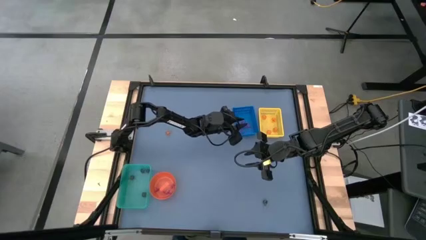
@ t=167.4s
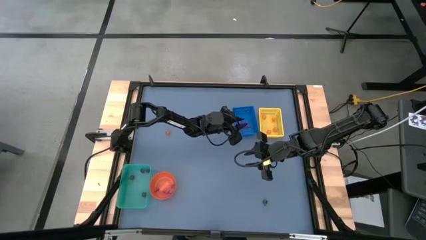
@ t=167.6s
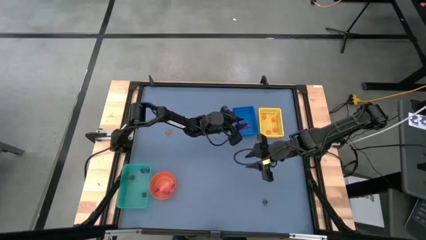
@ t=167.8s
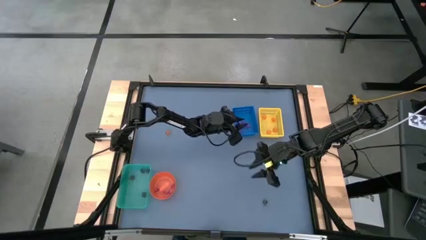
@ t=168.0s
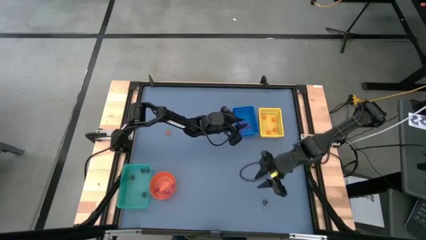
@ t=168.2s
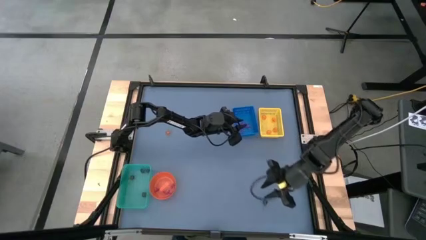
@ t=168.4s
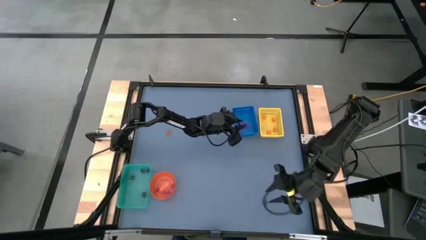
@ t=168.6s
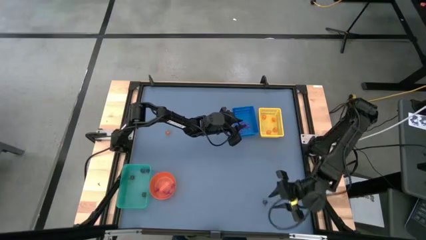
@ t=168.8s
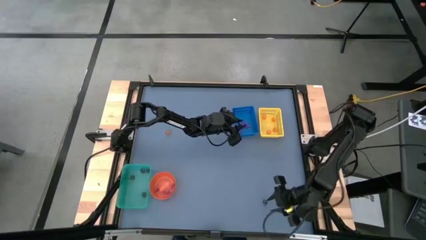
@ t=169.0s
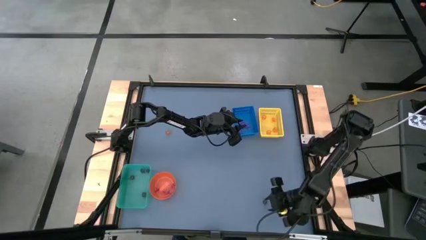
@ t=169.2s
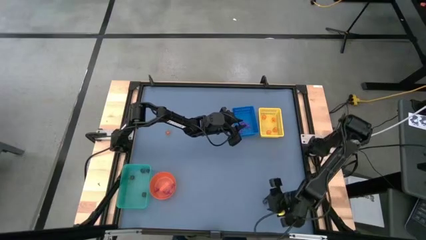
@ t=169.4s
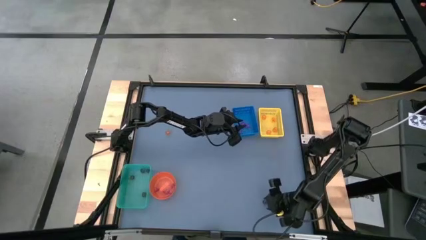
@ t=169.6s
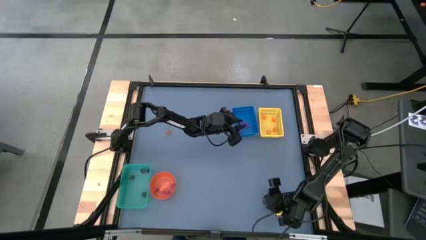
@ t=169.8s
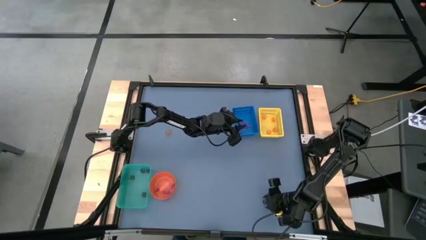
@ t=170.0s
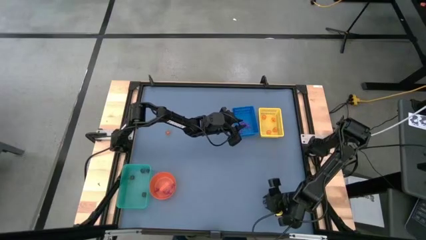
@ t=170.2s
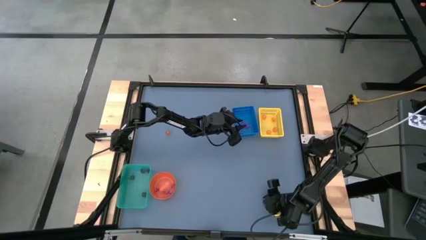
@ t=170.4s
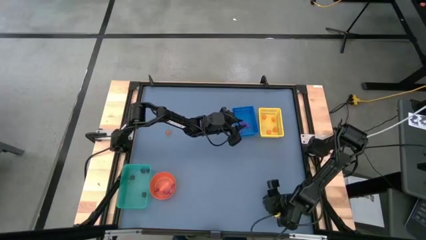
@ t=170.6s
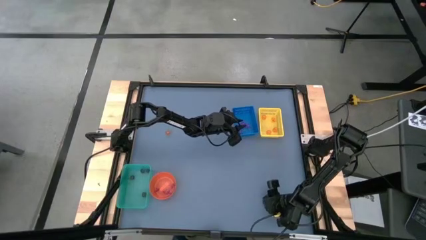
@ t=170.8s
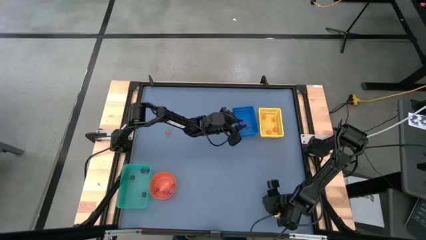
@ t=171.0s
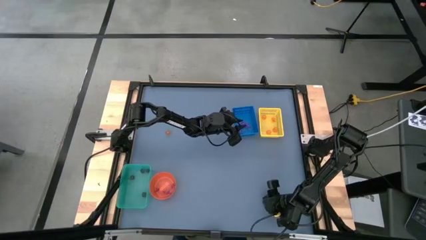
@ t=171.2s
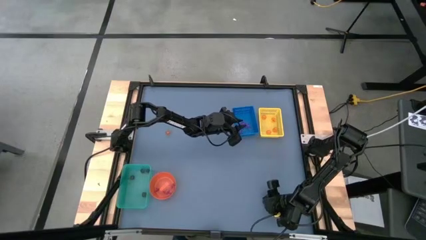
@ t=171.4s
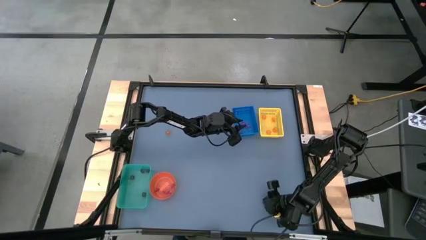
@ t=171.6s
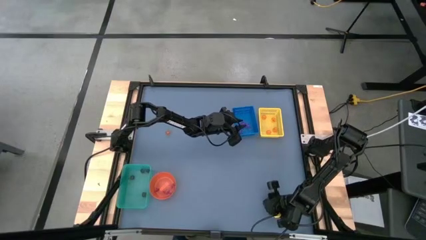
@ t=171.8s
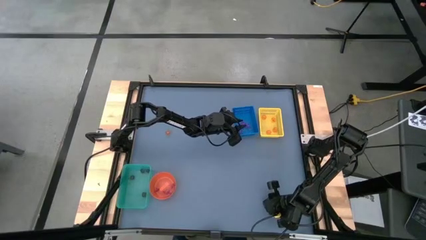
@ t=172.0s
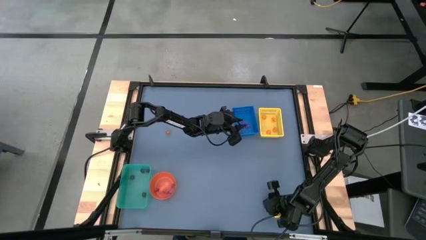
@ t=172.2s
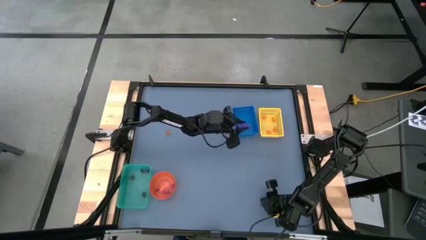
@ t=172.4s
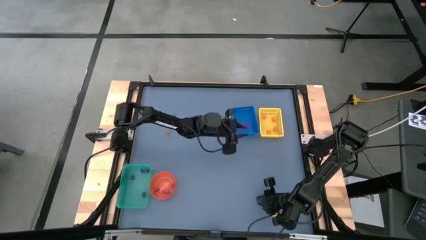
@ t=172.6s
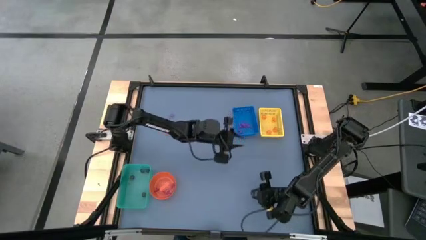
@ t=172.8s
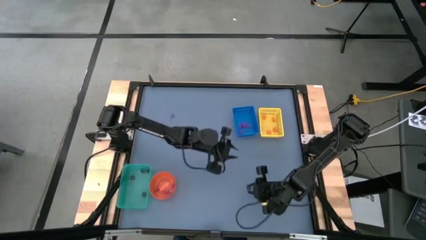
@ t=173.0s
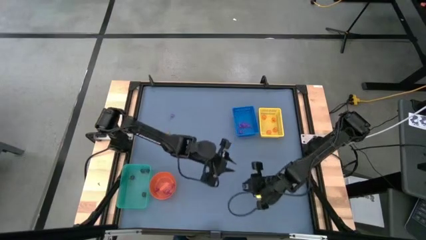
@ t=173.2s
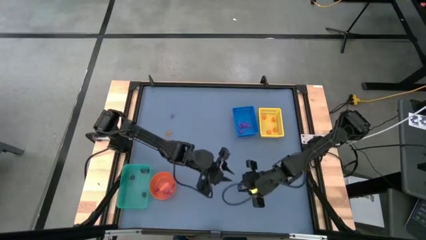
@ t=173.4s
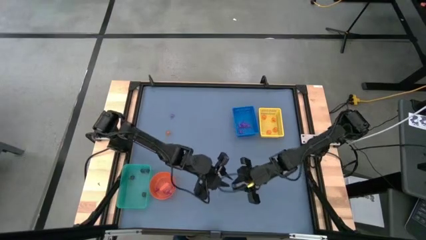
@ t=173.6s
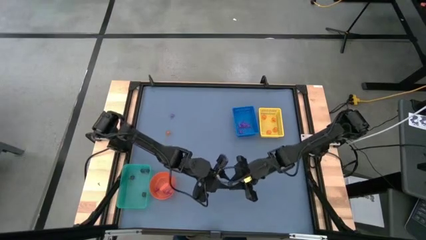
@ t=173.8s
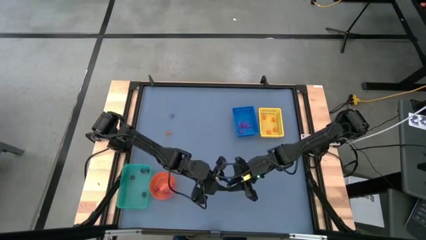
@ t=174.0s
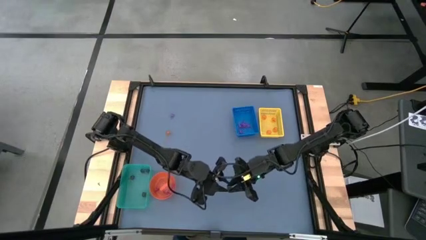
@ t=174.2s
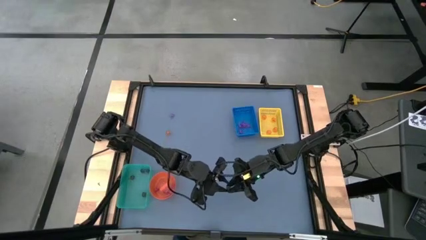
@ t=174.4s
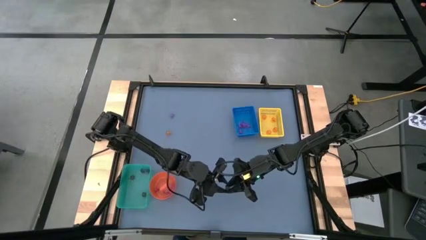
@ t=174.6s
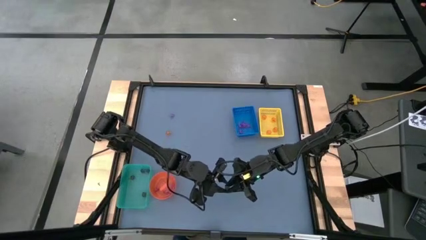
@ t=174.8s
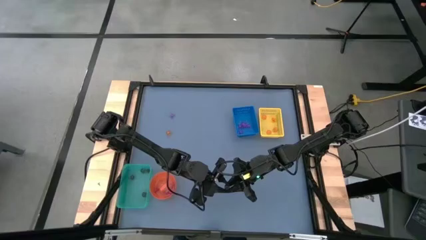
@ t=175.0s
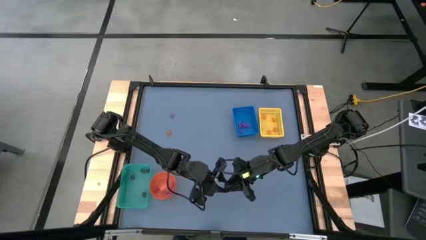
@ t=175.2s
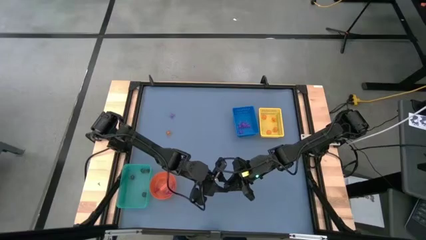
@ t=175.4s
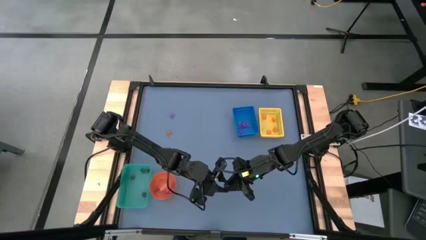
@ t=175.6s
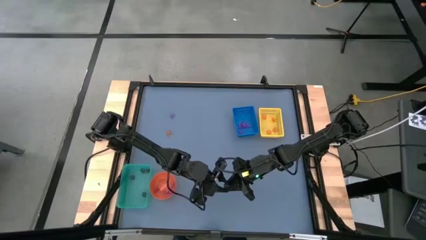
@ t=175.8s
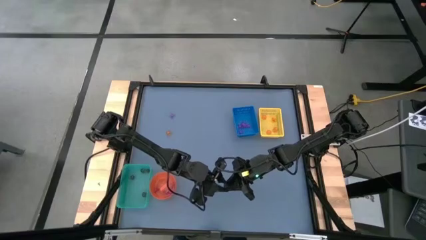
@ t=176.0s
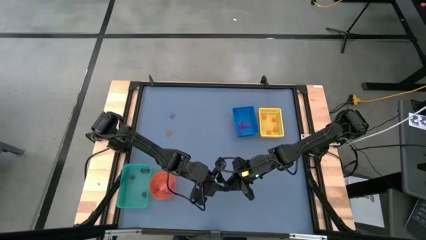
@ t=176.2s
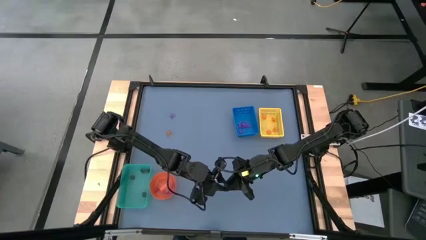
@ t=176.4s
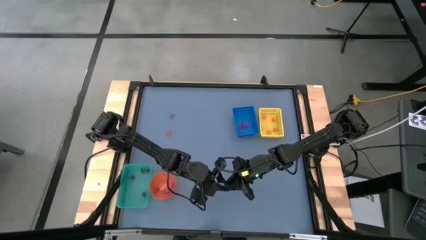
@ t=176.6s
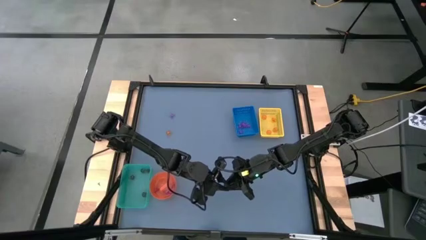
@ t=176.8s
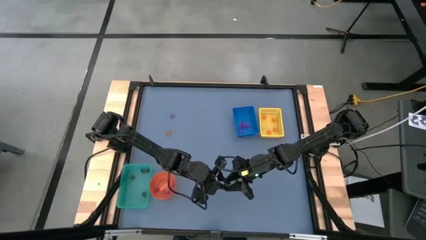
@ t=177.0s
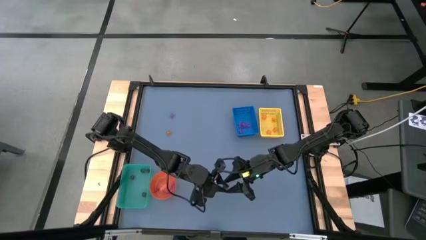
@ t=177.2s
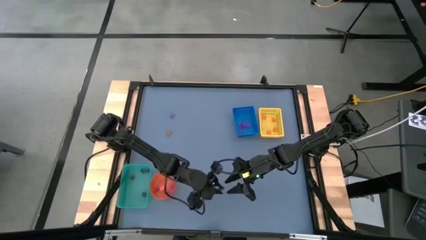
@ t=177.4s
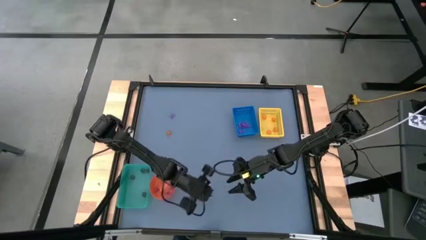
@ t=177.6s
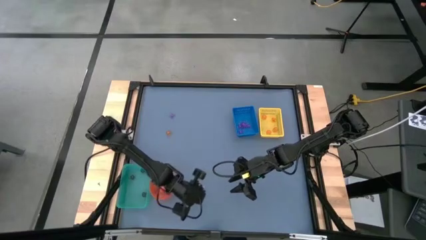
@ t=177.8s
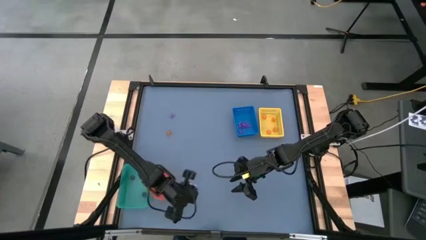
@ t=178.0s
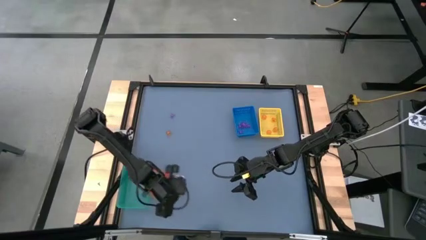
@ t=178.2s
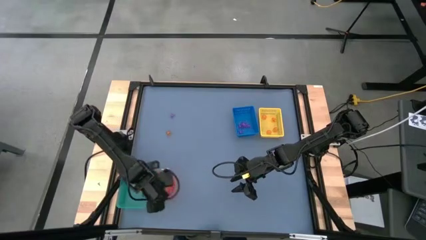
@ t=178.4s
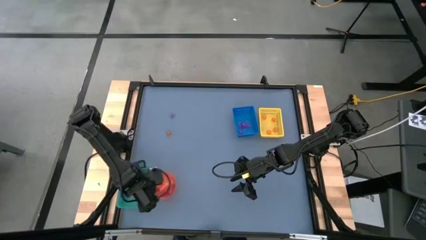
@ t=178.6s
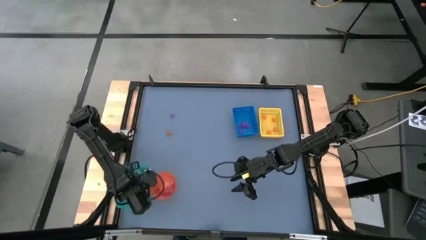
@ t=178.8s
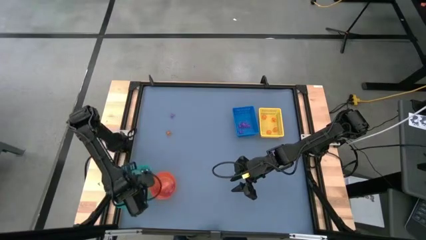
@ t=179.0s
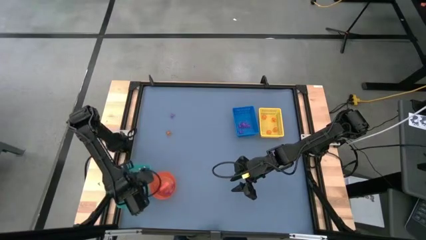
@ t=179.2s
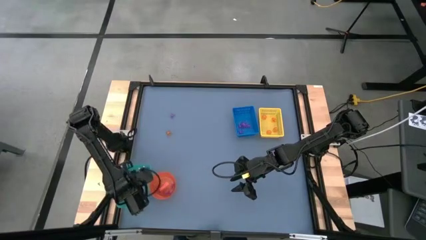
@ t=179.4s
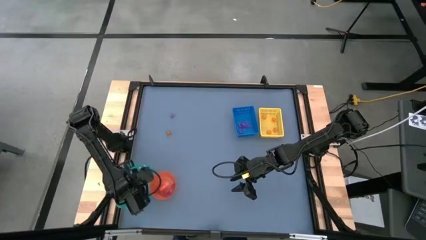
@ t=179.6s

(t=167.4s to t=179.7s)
Task: Sort Halloween decoration
Put the brown skull toy into the light blue bin
